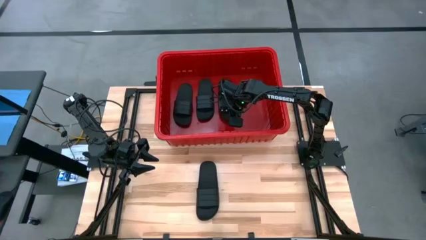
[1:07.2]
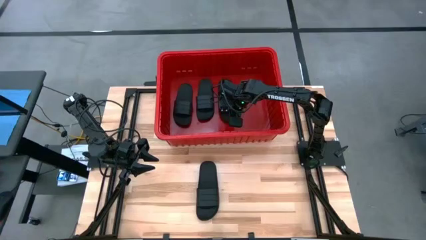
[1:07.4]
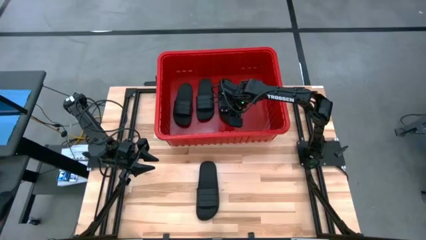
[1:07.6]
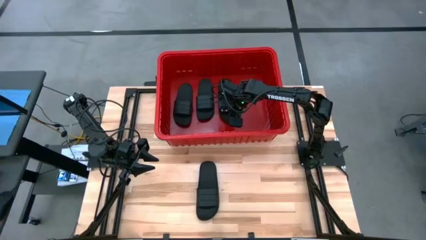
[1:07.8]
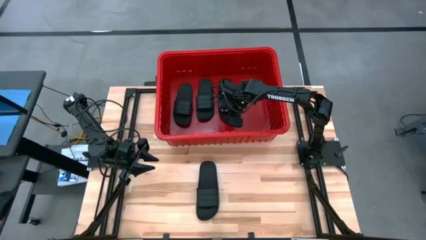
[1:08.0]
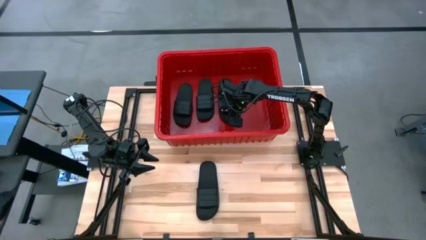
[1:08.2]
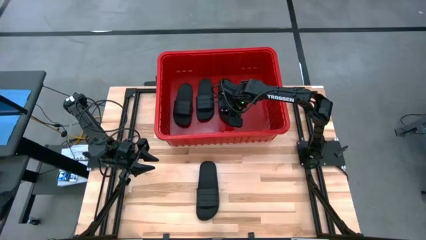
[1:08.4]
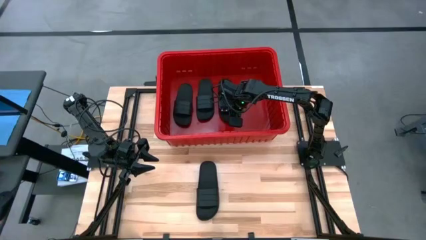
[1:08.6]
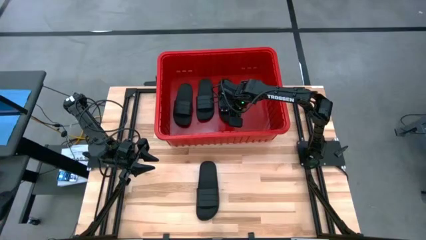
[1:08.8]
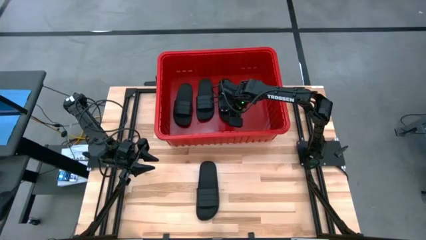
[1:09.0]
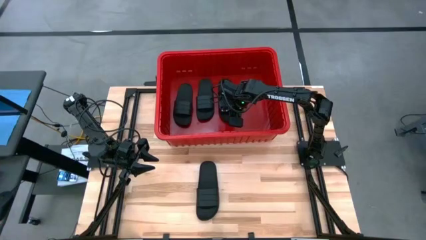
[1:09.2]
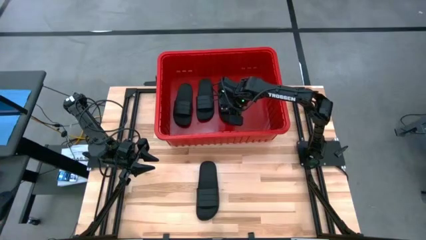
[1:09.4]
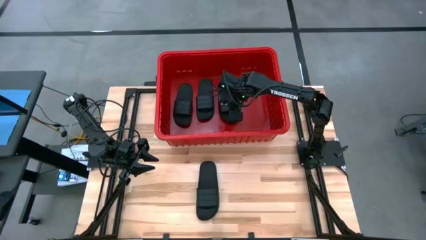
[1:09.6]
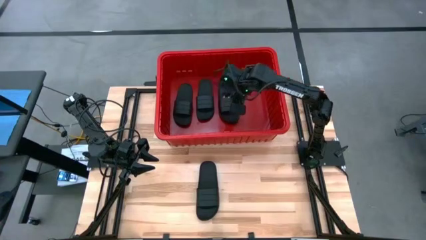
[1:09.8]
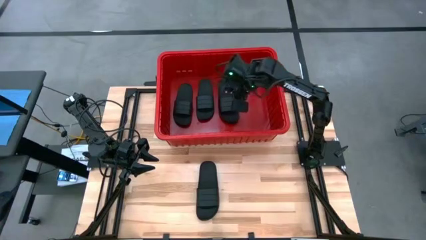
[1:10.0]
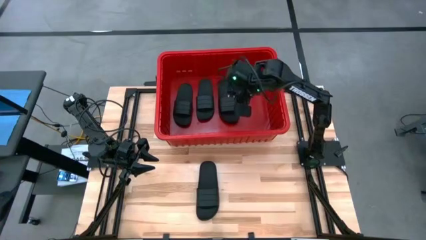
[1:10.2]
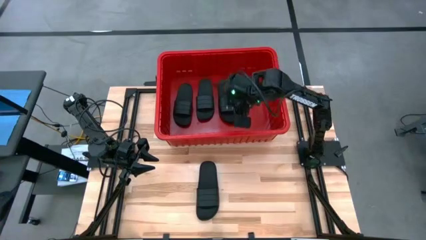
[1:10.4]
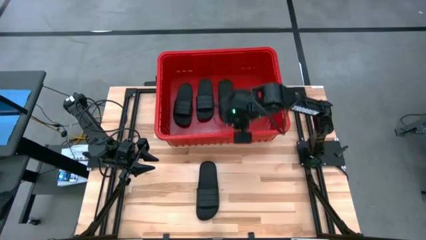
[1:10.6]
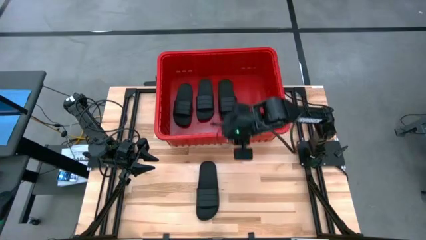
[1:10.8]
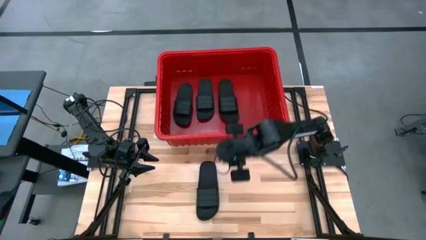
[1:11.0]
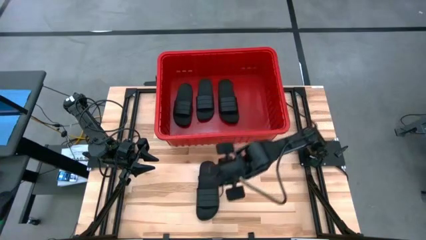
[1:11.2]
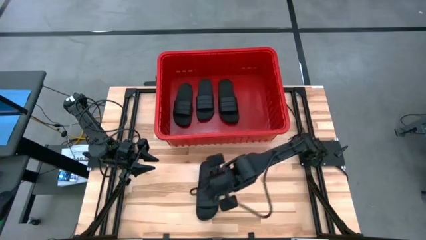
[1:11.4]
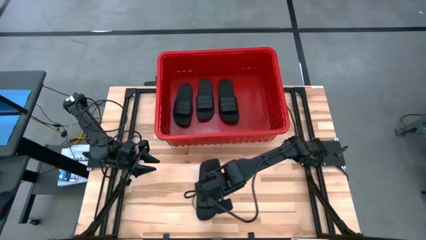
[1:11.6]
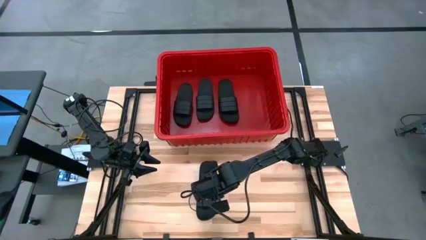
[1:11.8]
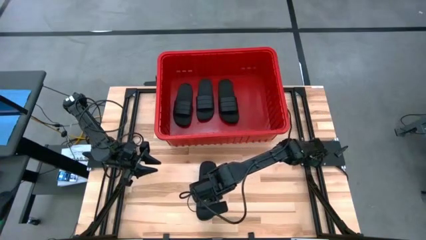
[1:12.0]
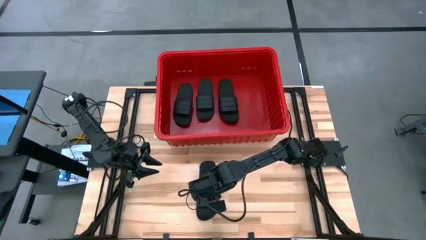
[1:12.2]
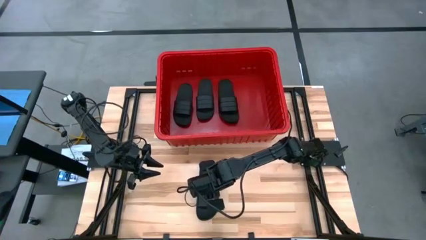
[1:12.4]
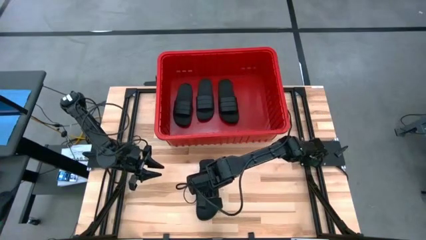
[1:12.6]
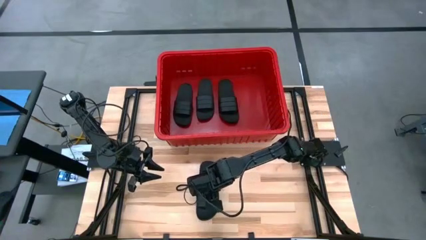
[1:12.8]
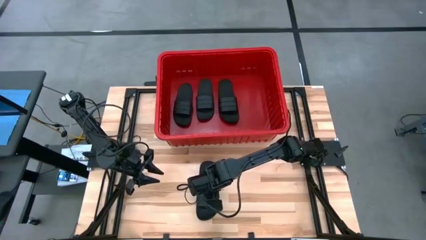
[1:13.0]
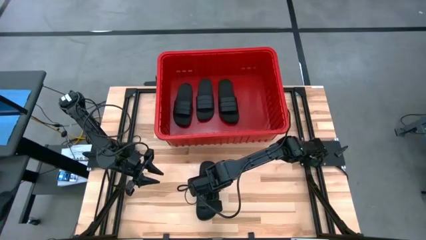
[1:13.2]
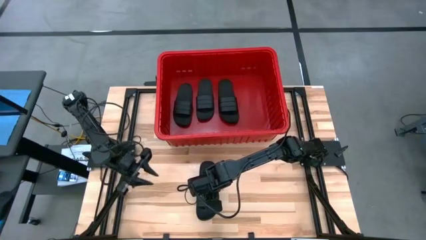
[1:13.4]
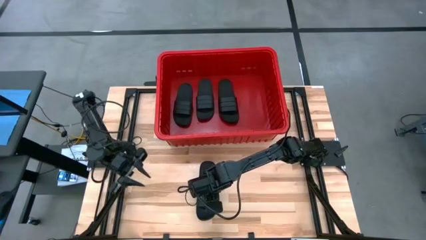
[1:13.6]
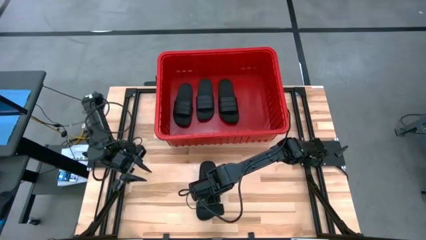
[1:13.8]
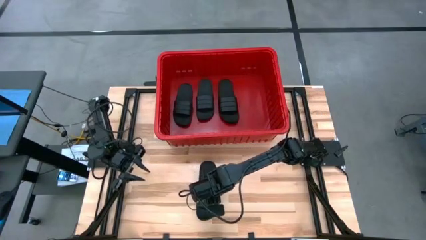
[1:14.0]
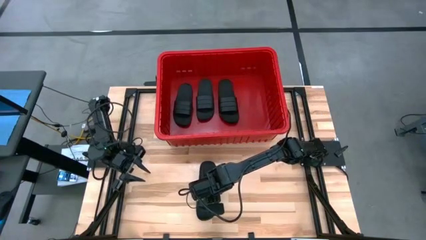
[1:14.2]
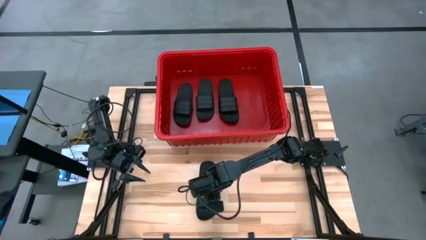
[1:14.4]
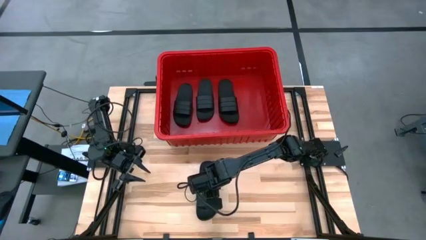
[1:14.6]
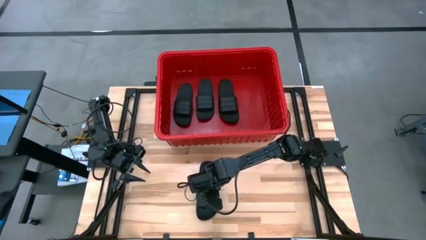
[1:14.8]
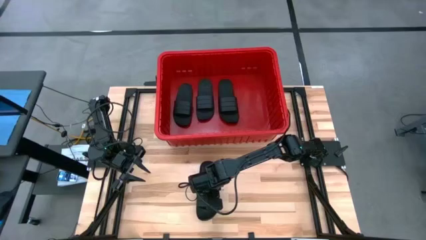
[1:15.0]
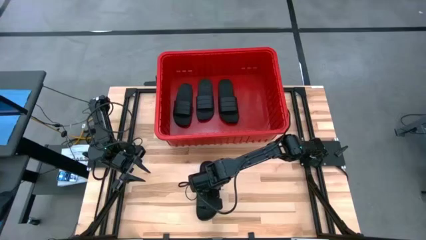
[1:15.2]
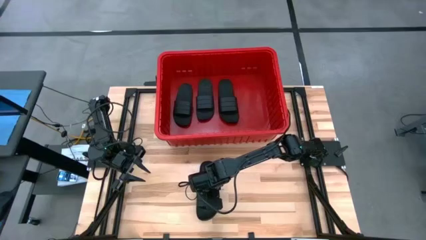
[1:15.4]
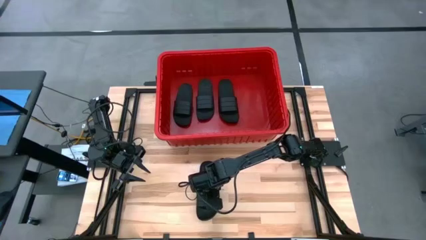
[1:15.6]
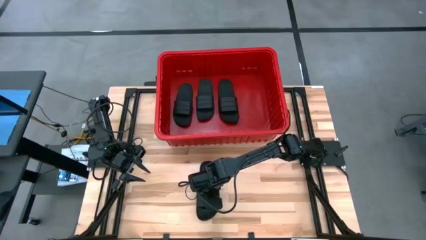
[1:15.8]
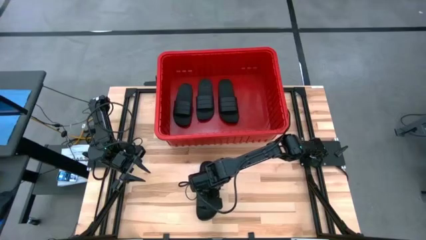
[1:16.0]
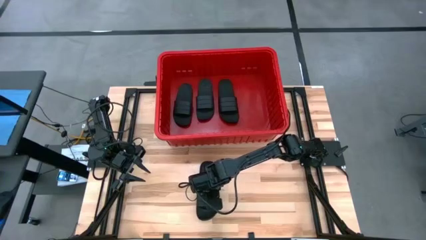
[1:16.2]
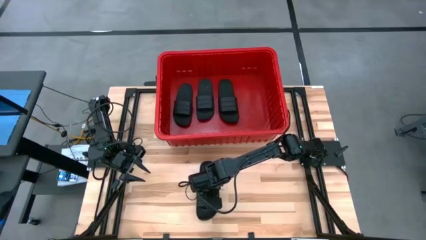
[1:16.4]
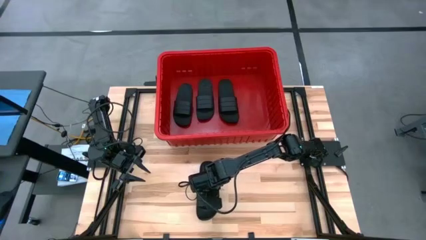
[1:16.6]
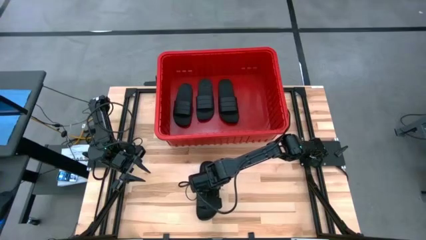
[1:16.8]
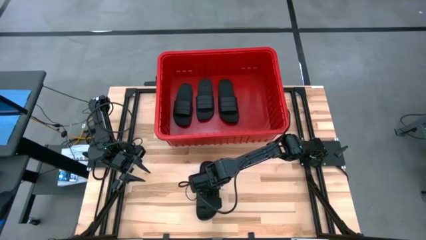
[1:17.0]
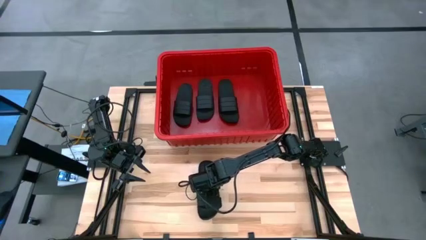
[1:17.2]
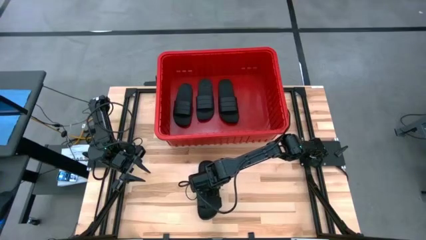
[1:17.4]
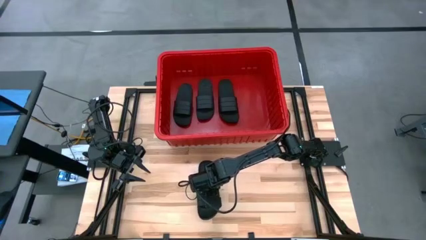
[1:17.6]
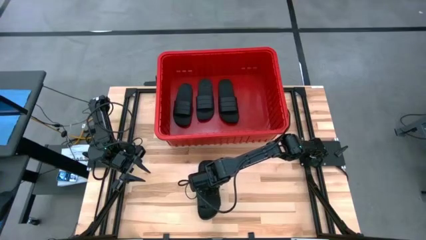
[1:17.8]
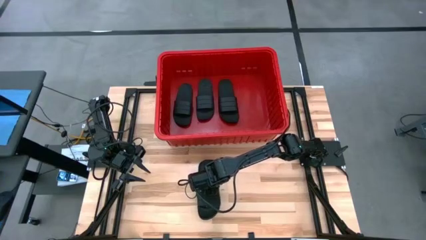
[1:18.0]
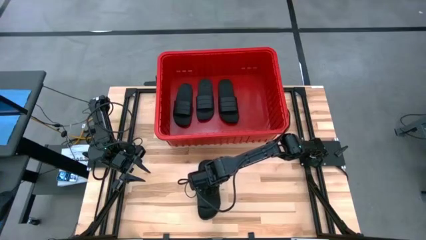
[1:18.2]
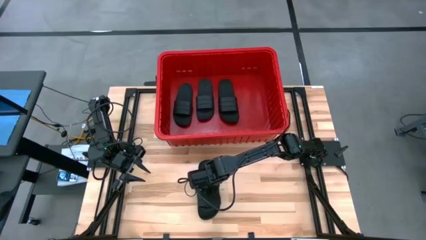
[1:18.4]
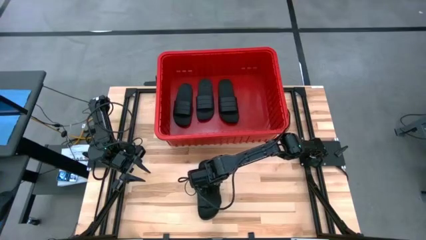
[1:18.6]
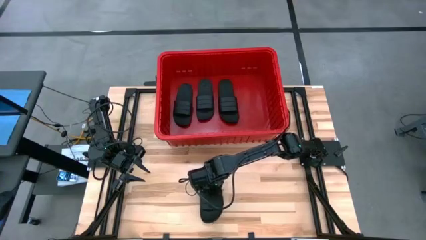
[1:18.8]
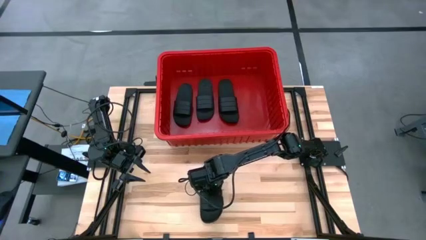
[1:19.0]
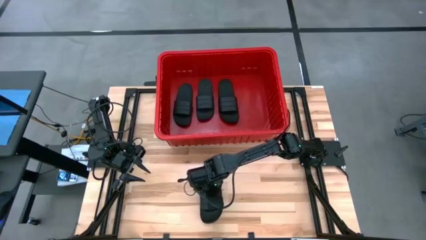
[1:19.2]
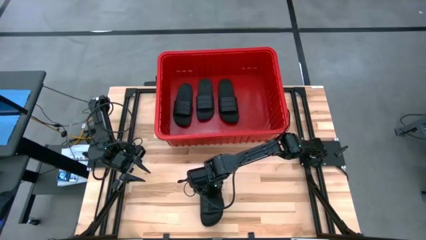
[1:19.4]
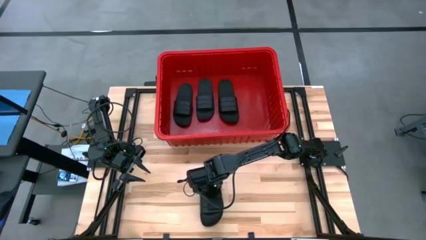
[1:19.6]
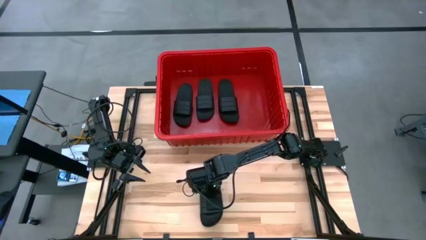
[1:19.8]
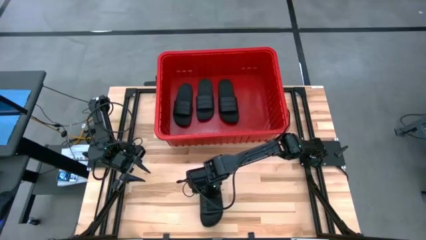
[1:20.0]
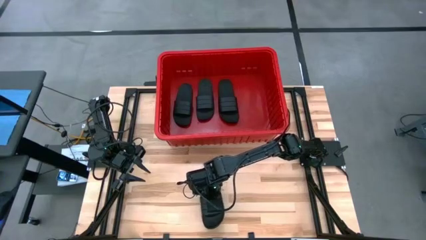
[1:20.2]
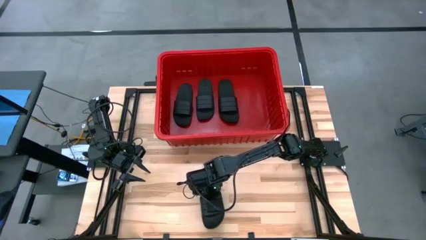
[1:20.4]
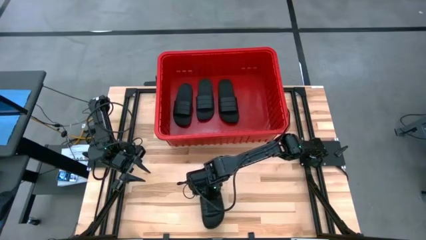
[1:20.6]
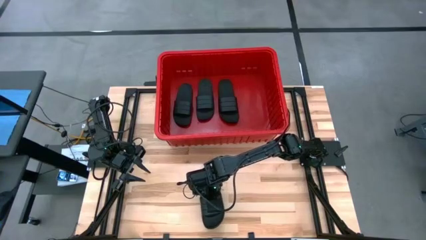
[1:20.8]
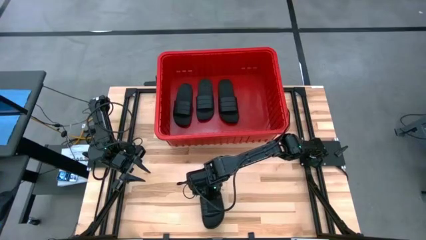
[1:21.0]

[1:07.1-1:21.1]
Task: Pick and place slides into bin
Put the slide into the bin
